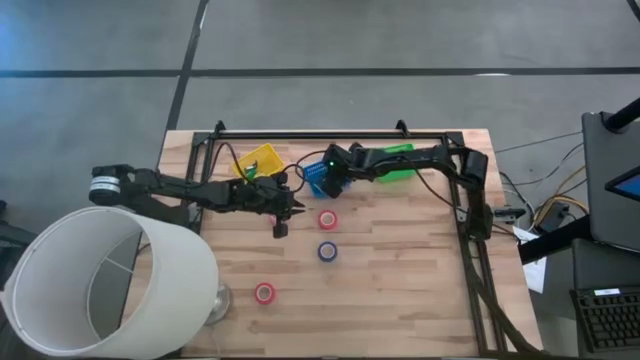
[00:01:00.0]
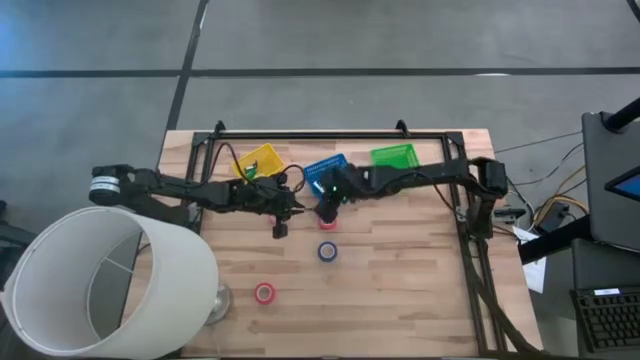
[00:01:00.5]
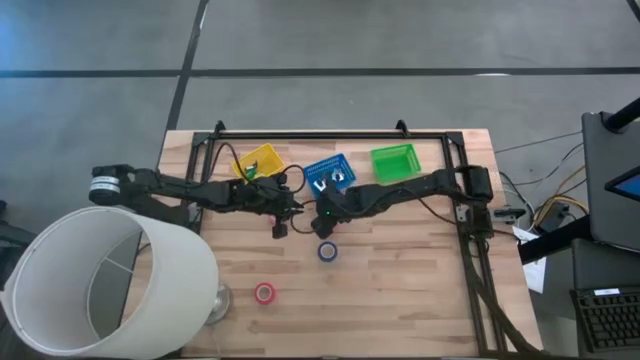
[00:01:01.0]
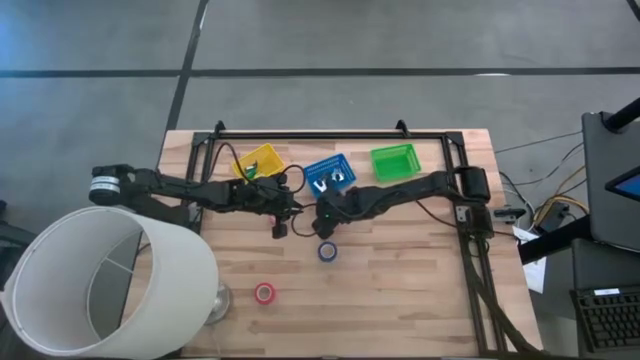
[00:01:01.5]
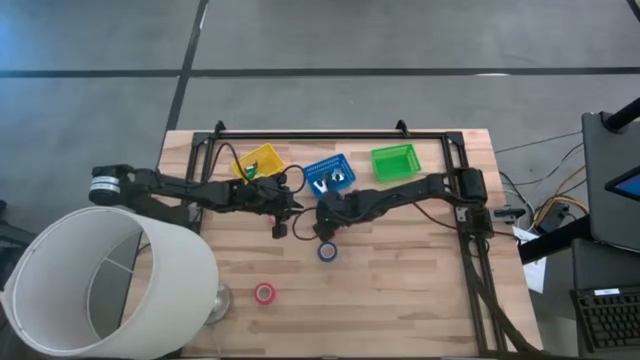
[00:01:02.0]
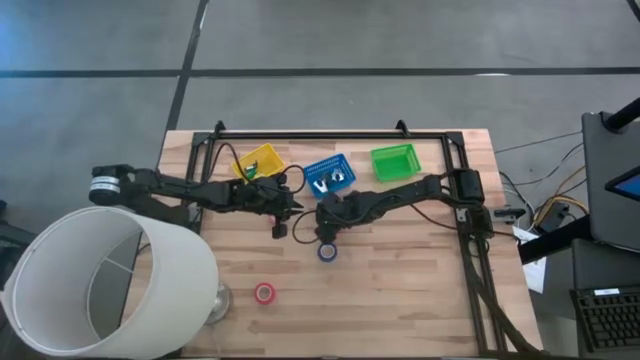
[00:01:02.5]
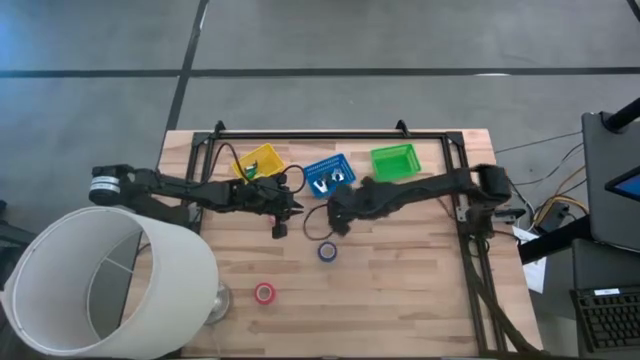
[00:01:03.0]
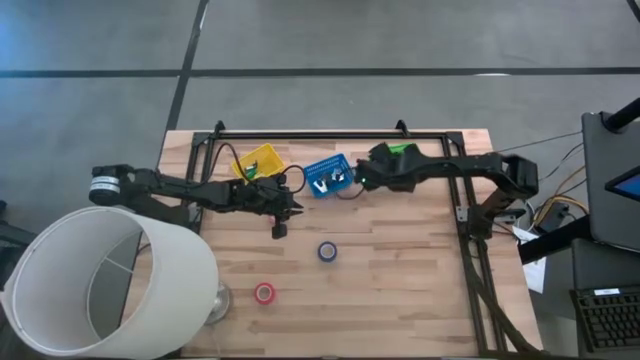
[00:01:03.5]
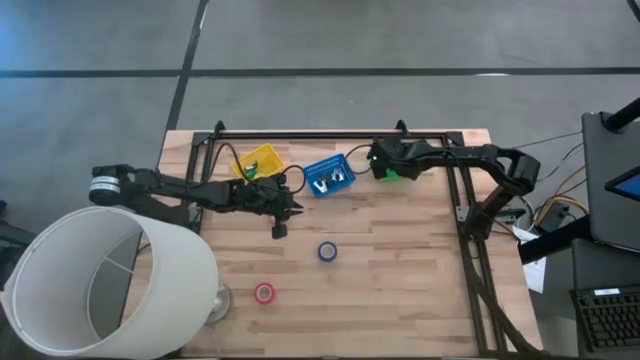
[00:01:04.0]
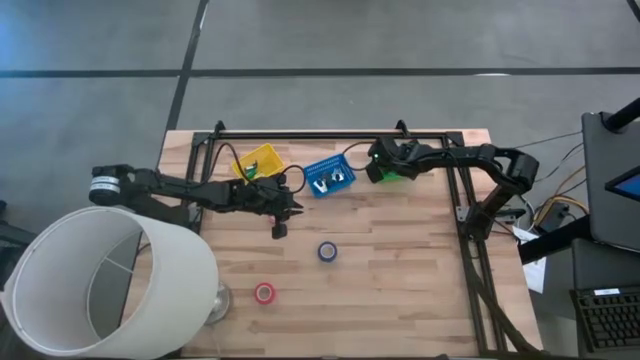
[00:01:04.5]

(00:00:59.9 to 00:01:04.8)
Task: Pick and place Stapler, Stapler remover, tape
Put the top red tape into the green basket

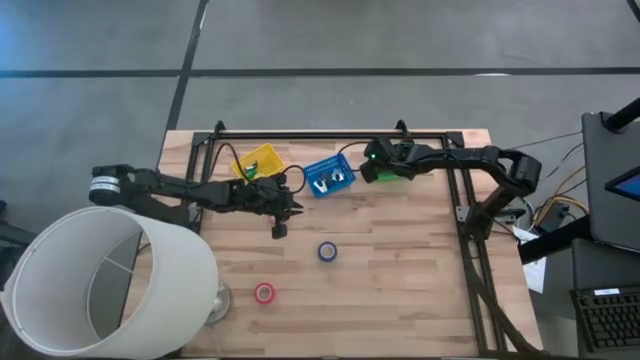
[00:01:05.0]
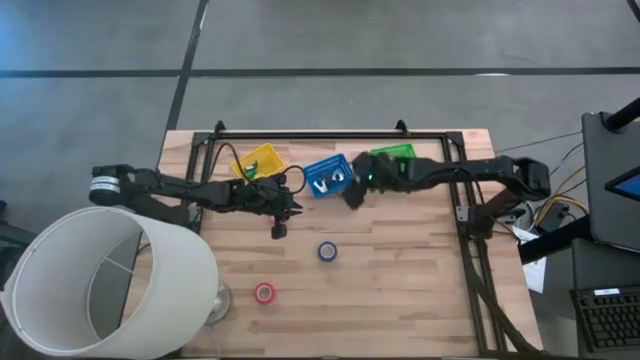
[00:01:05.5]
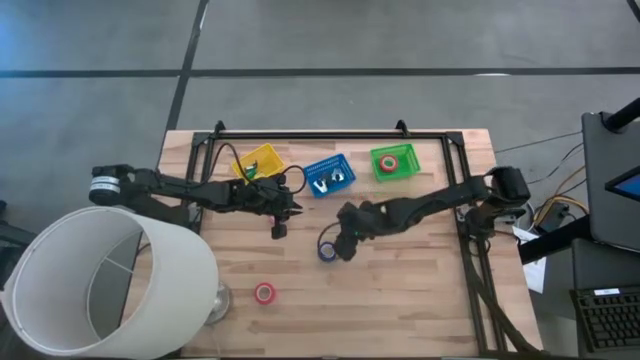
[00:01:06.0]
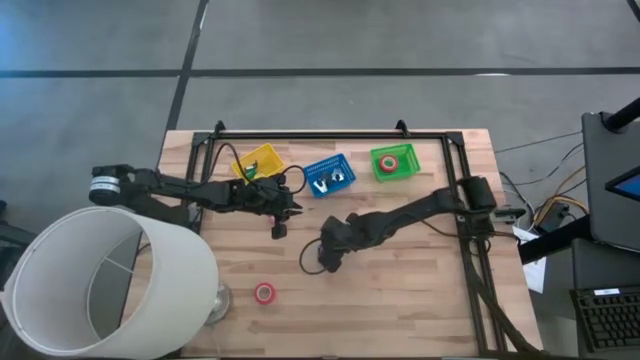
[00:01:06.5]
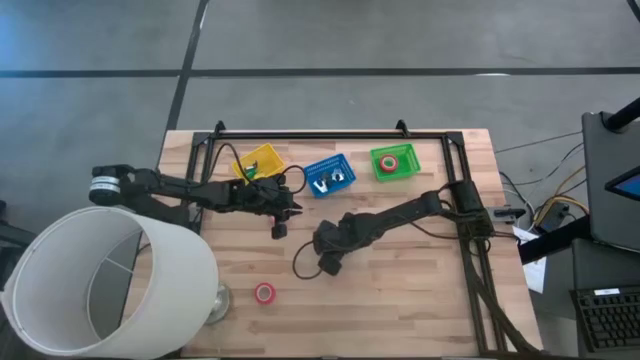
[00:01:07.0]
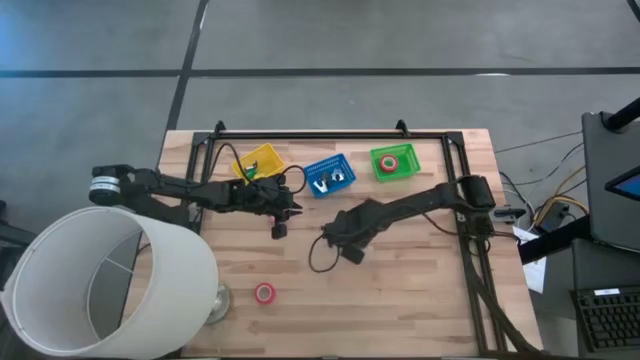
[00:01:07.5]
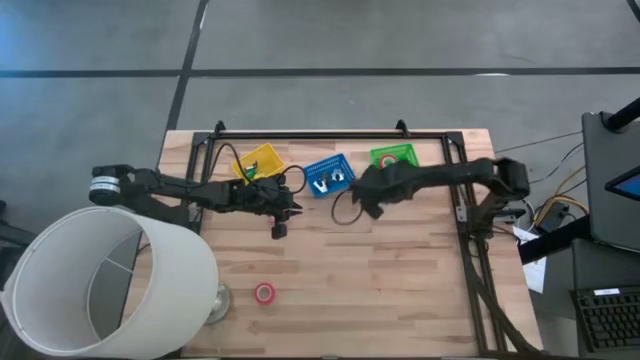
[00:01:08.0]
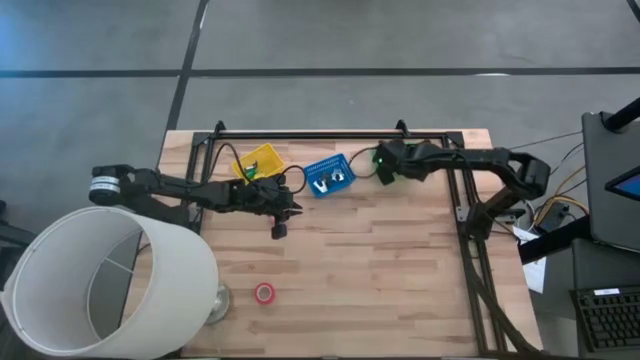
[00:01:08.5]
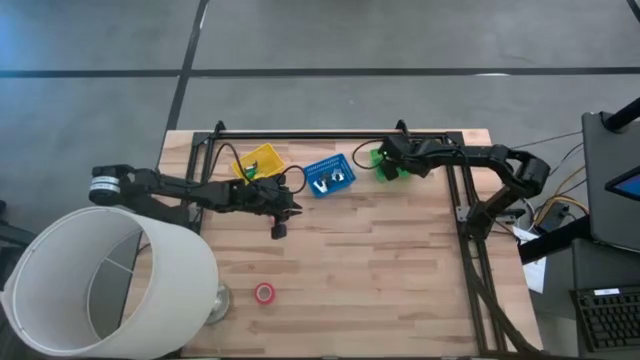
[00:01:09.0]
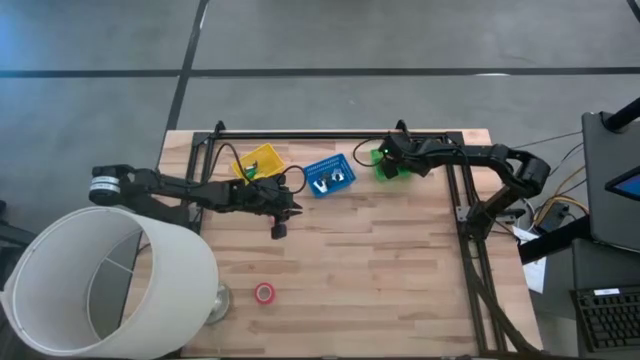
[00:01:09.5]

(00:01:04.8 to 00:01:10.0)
Put the blue tape into the green basket

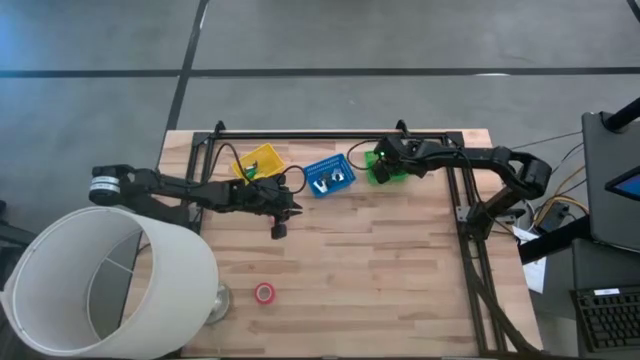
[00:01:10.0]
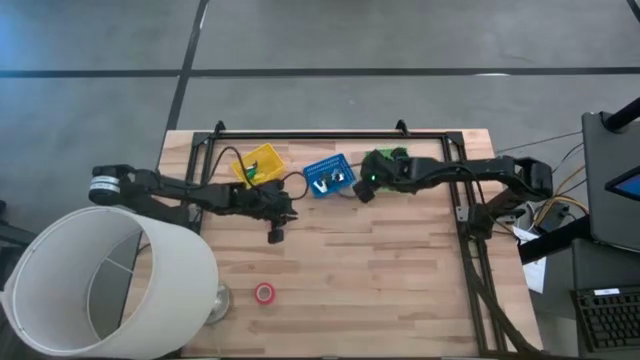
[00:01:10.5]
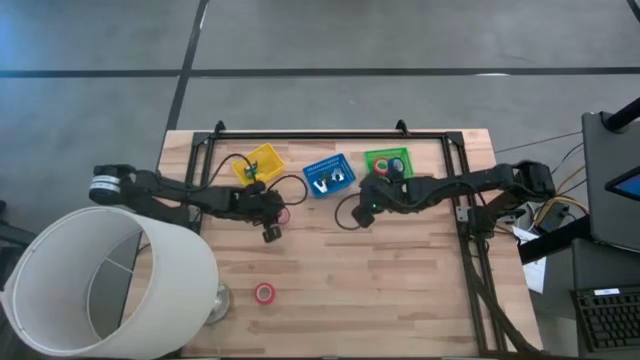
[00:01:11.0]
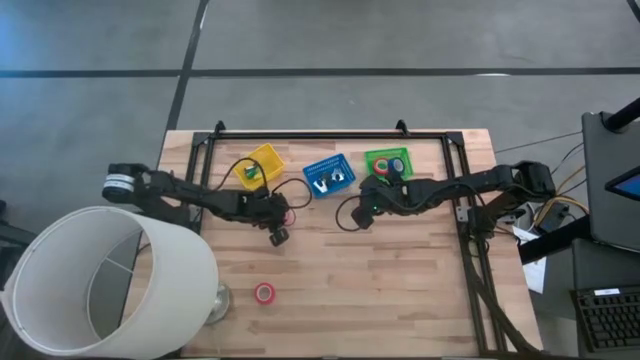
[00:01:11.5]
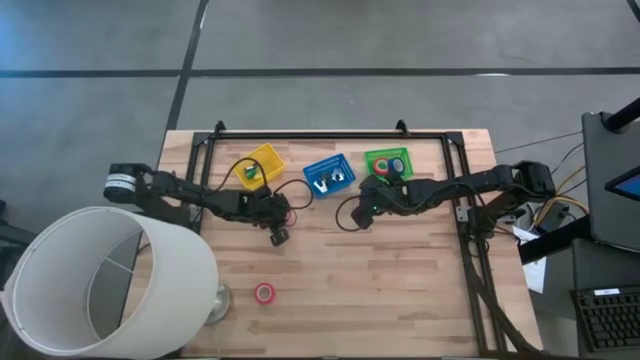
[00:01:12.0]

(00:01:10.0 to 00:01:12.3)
Put the pink tape into the green basket

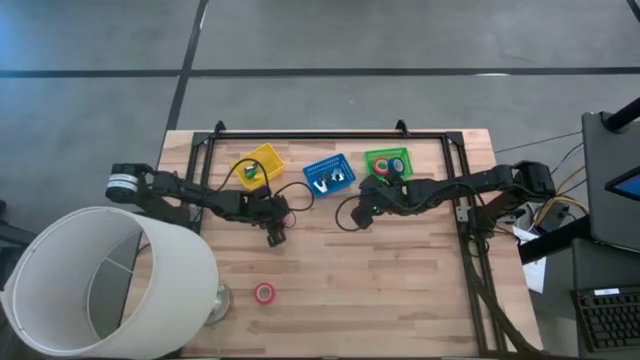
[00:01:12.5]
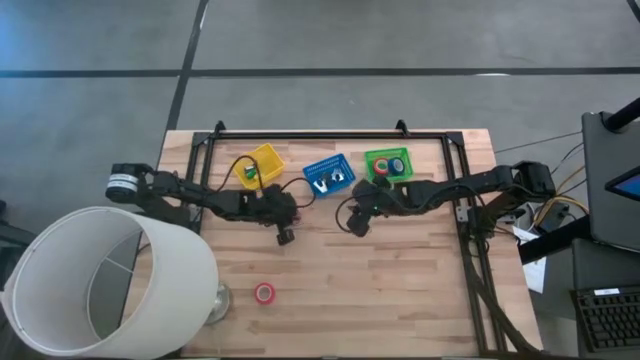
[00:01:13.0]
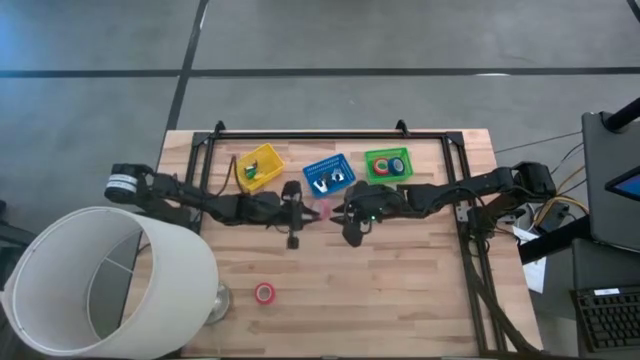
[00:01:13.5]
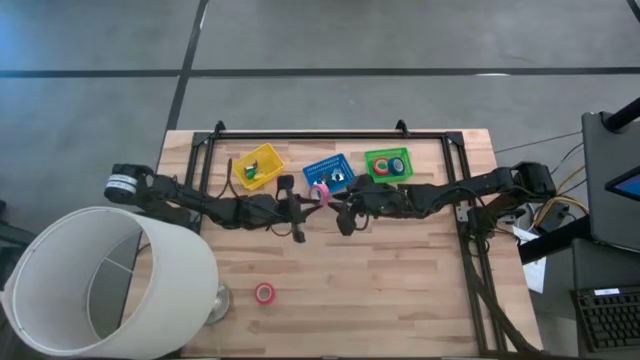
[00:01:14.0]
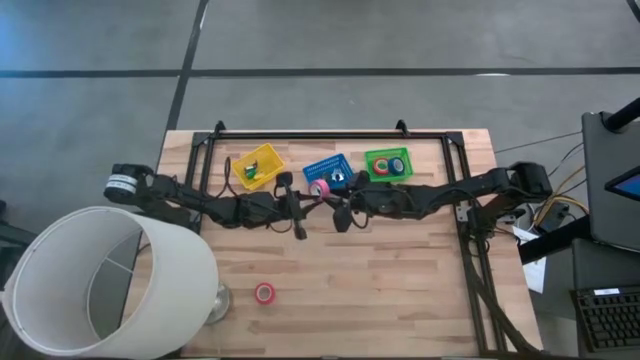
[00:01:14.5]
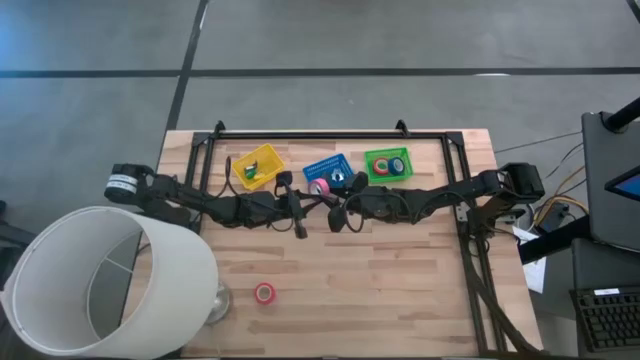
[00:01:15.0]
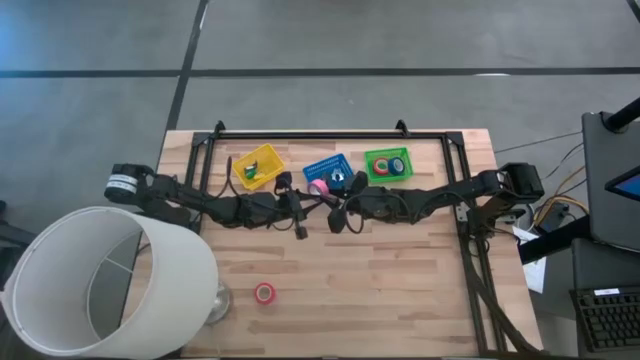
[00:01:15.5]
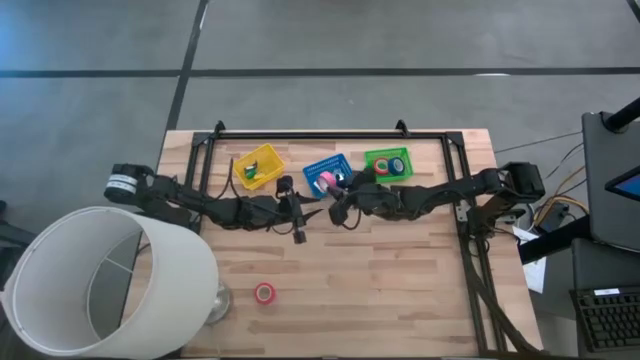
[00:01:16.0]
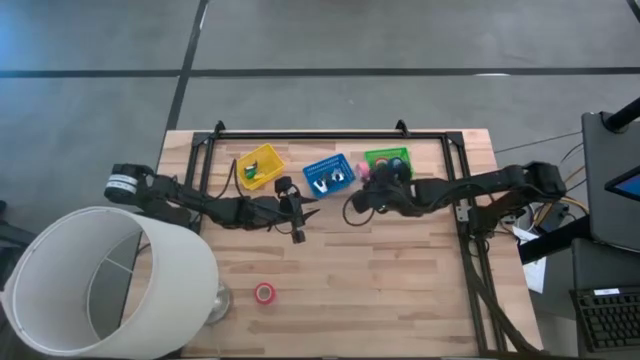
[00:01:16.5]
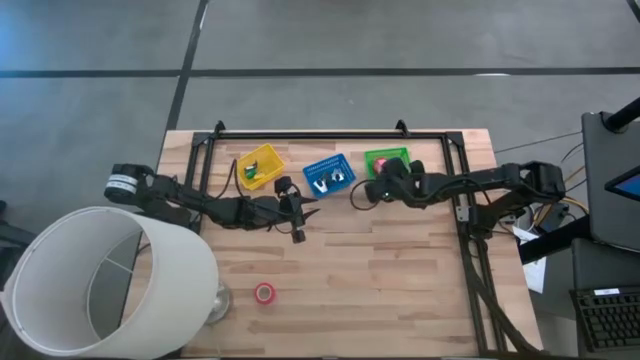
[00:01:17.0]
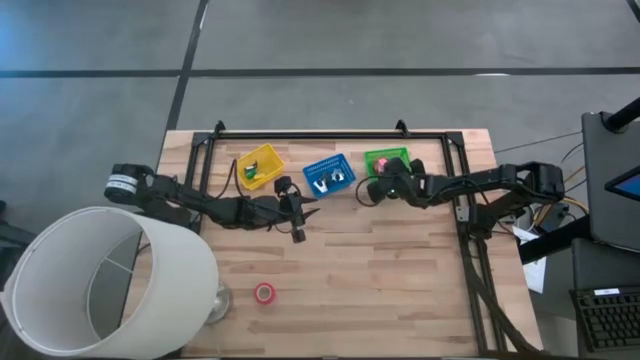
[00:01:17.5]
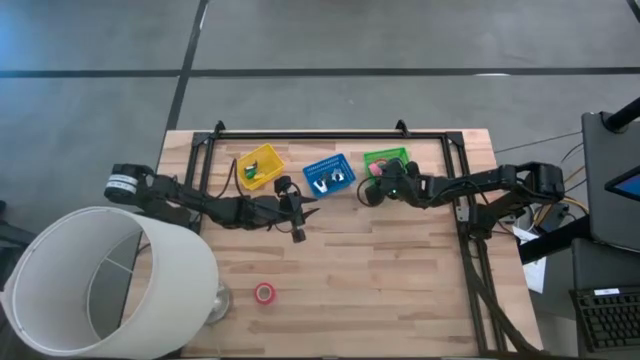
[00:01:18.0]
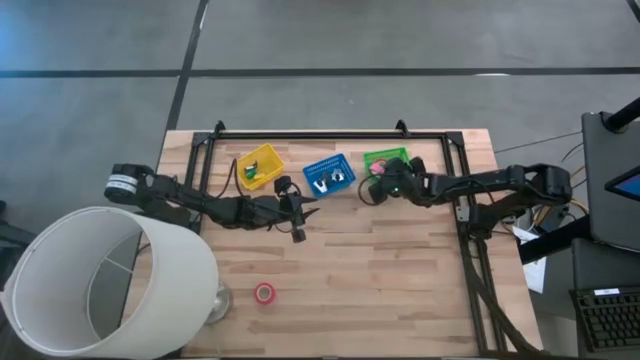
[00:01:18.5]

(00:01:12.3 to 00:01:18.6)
Put the pink tape into the green basket

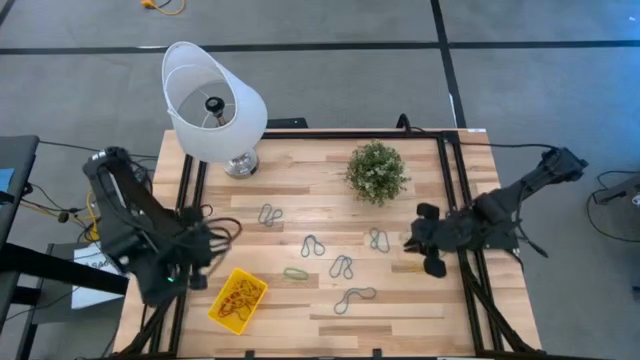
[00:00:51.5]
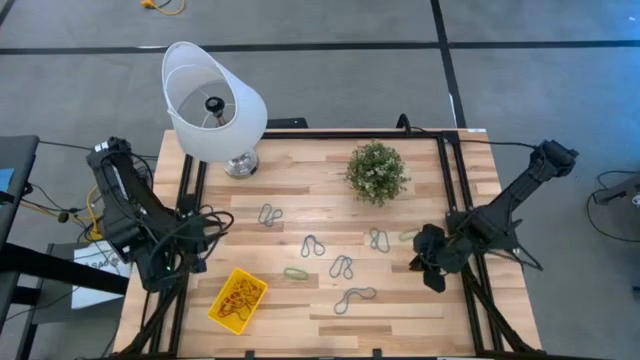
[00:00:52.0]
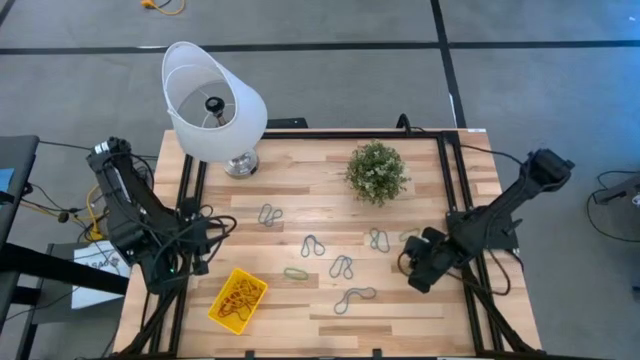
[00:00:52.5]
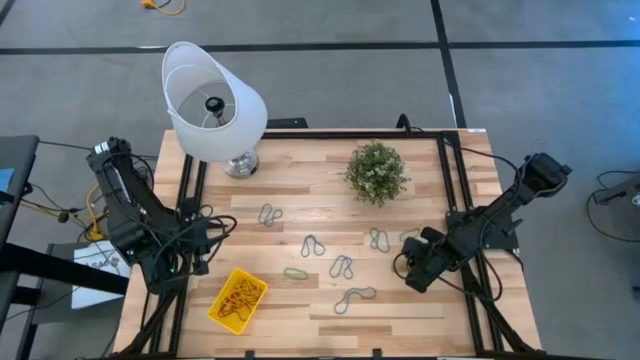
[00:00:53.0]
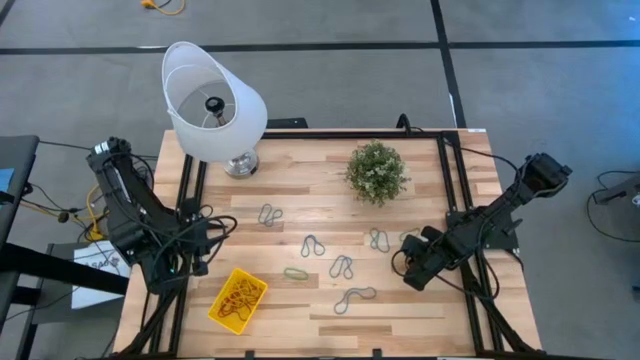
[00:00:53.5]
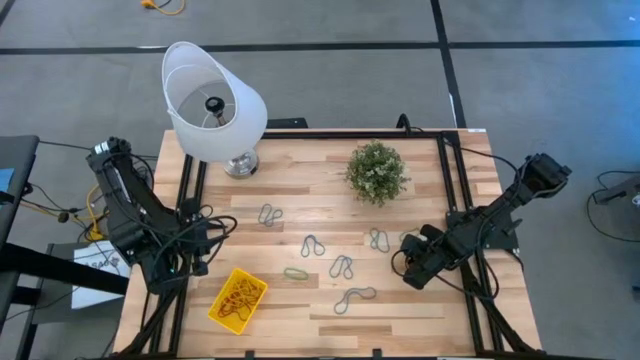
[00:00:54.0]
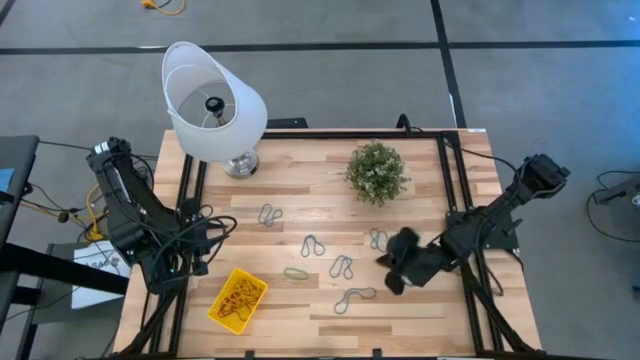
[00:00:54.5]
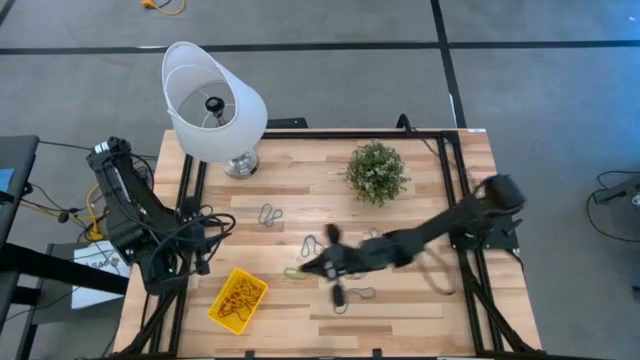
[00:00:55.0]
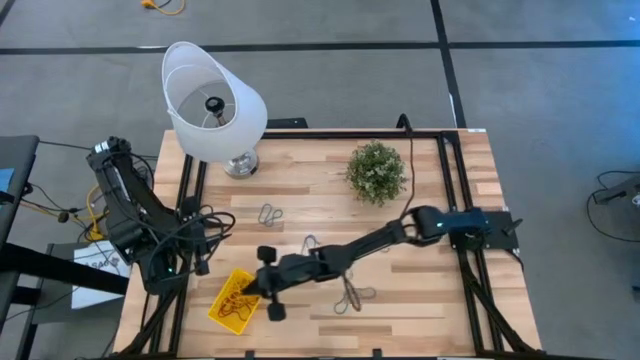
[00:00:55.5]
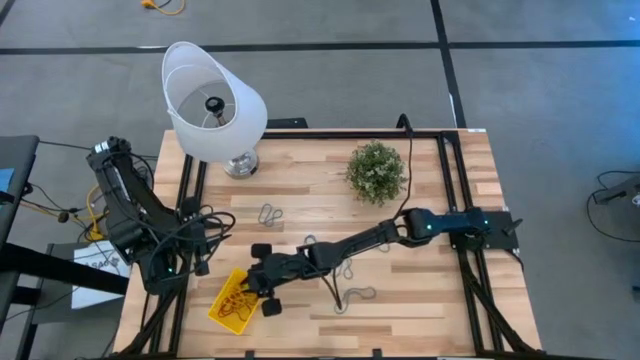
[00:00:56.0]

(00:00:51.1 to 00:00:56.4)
Task: Pick and place items into bin
Put the yellow rubberband into the yellow bin
